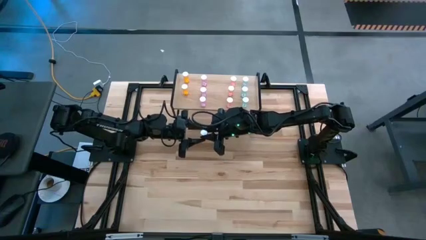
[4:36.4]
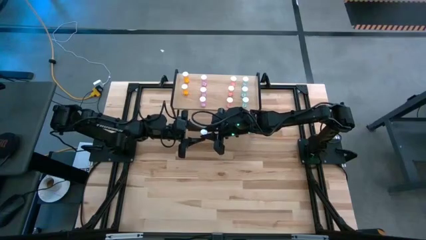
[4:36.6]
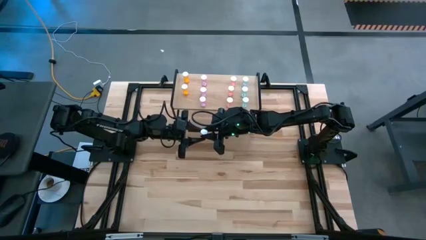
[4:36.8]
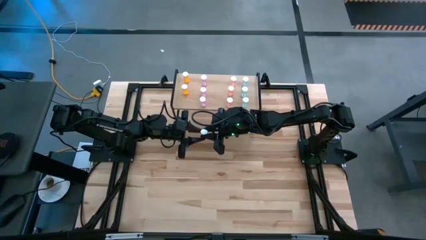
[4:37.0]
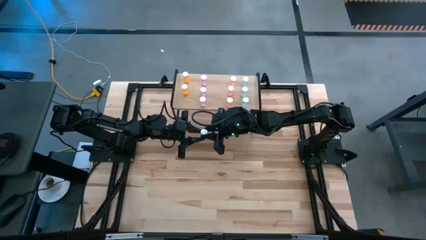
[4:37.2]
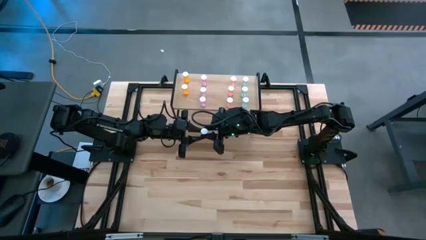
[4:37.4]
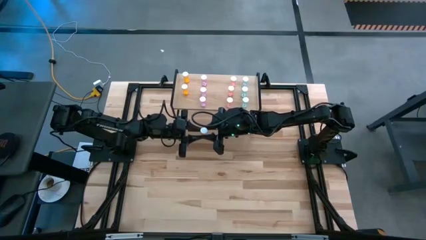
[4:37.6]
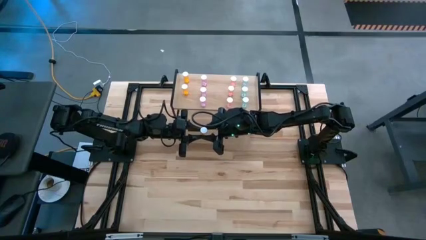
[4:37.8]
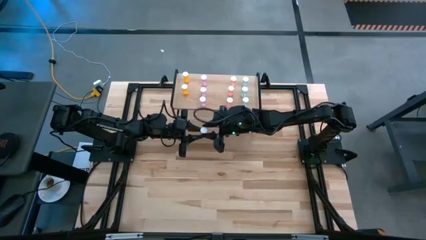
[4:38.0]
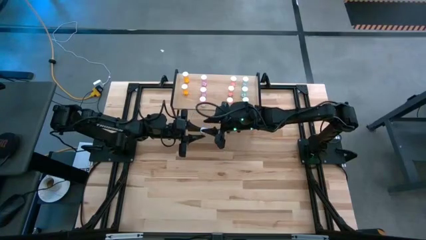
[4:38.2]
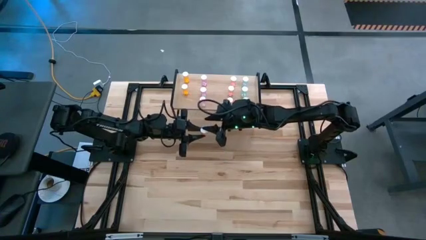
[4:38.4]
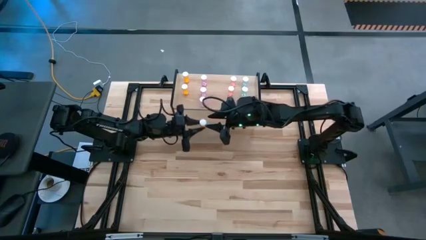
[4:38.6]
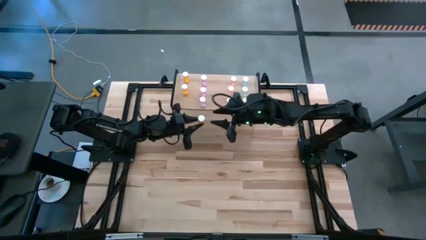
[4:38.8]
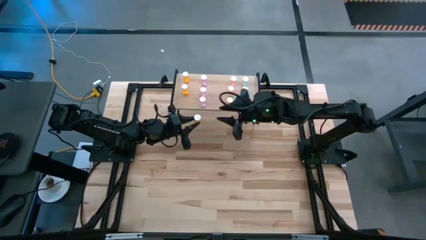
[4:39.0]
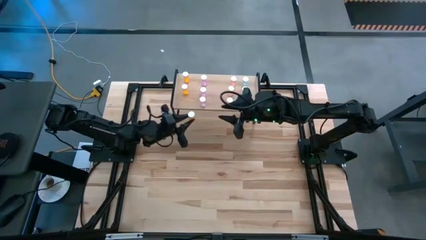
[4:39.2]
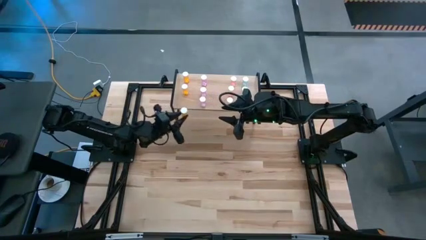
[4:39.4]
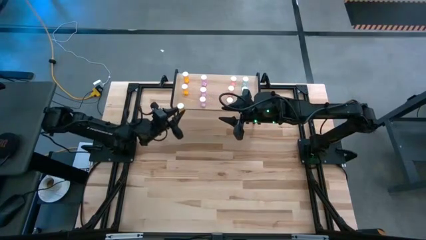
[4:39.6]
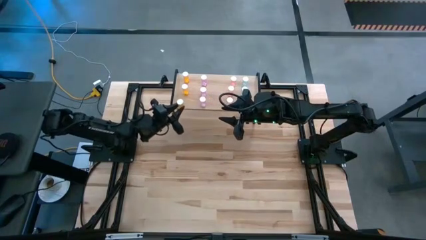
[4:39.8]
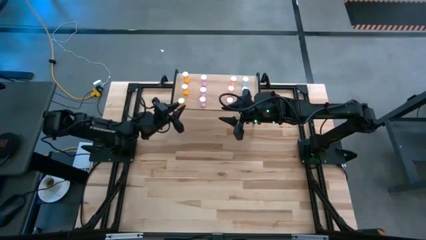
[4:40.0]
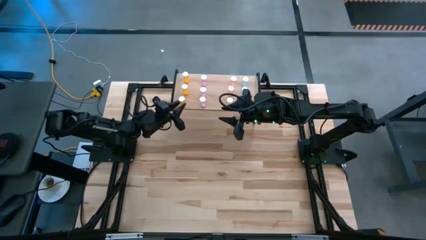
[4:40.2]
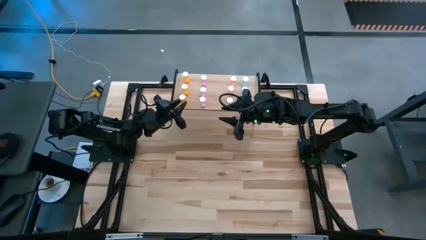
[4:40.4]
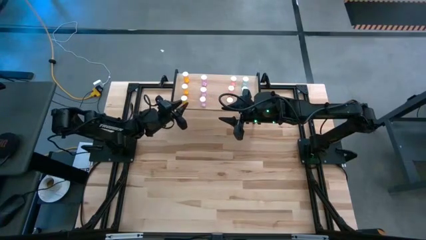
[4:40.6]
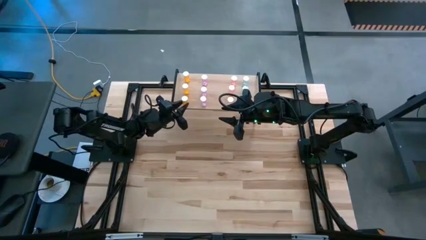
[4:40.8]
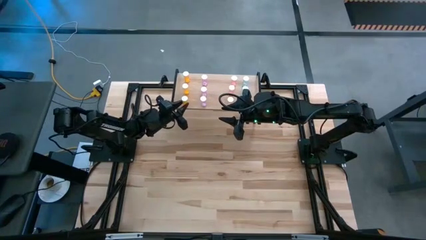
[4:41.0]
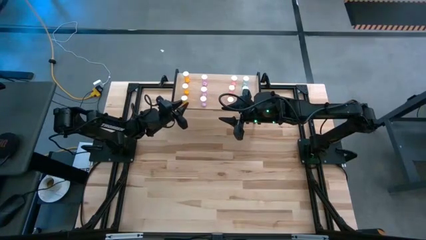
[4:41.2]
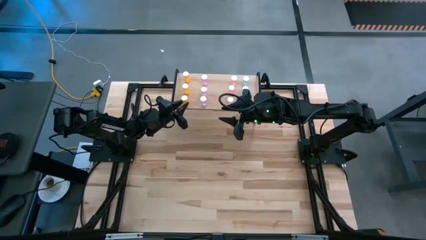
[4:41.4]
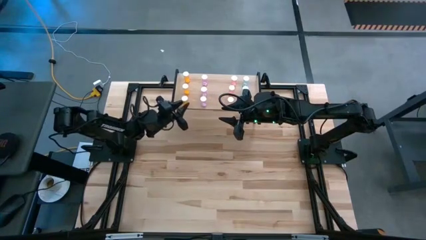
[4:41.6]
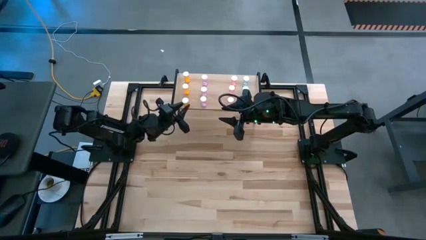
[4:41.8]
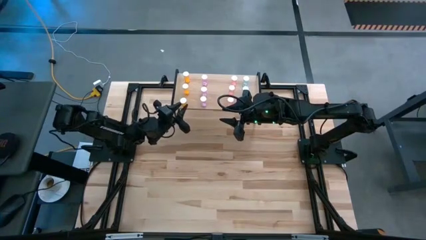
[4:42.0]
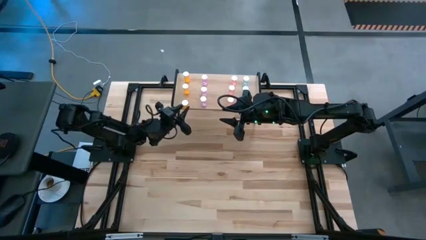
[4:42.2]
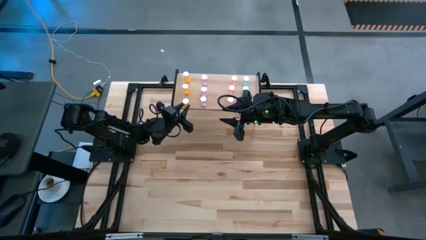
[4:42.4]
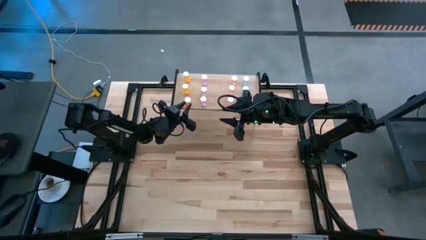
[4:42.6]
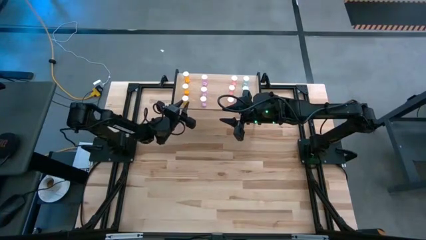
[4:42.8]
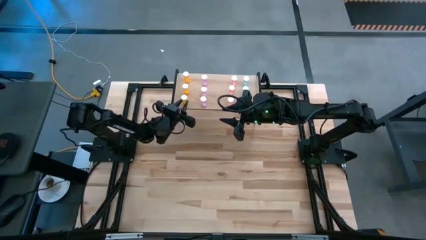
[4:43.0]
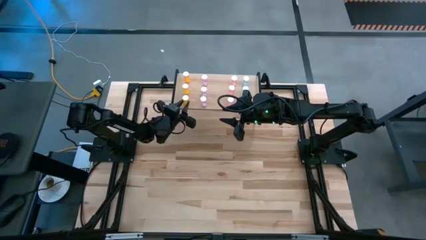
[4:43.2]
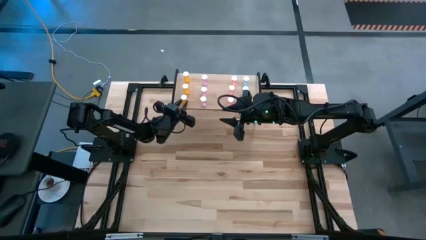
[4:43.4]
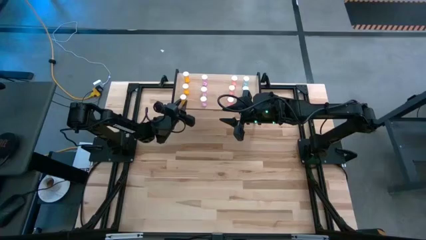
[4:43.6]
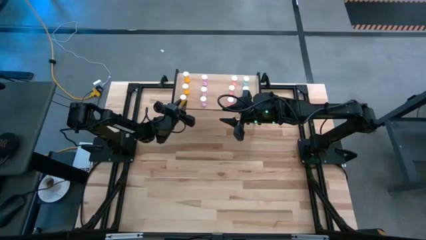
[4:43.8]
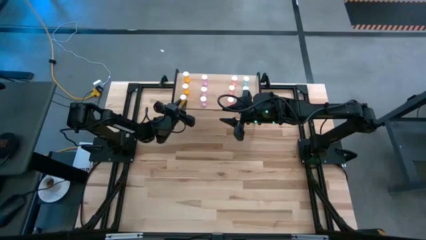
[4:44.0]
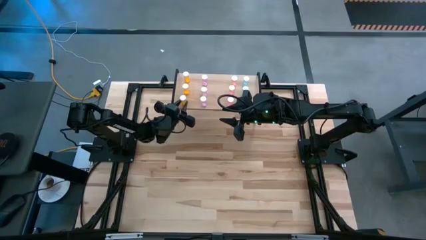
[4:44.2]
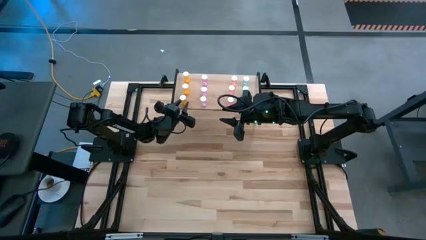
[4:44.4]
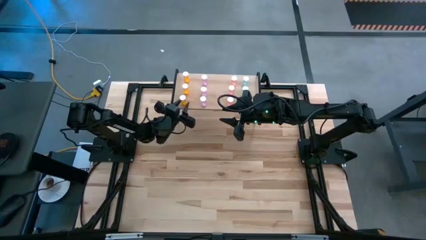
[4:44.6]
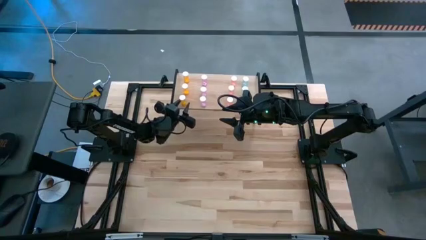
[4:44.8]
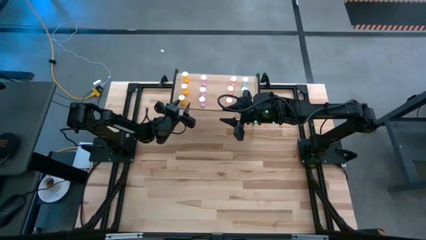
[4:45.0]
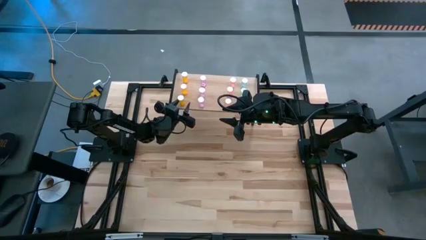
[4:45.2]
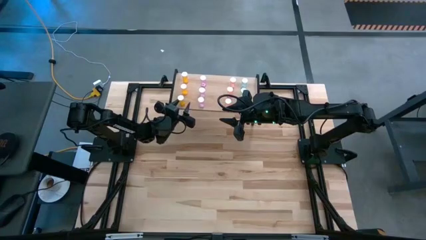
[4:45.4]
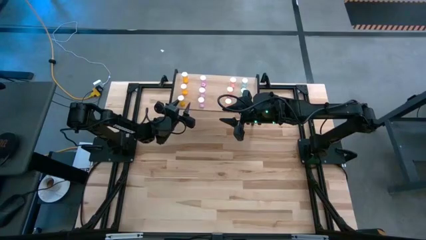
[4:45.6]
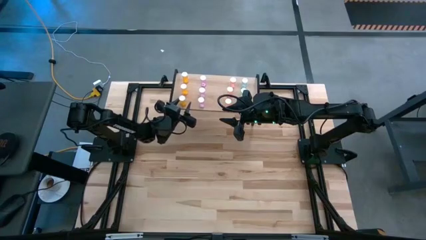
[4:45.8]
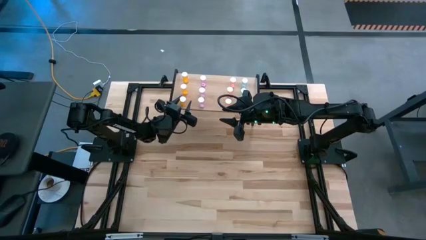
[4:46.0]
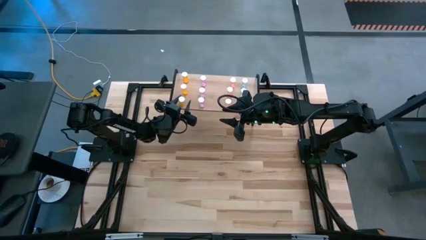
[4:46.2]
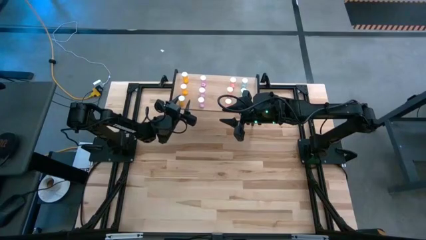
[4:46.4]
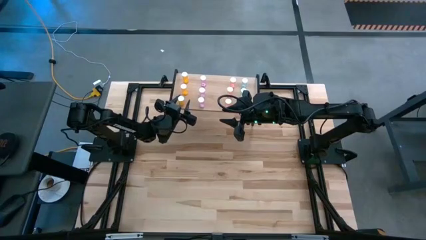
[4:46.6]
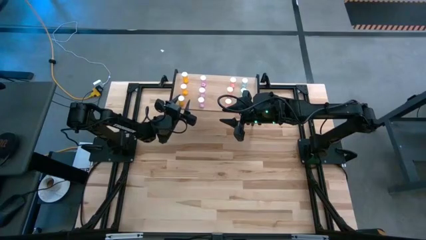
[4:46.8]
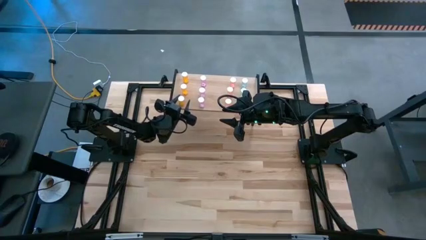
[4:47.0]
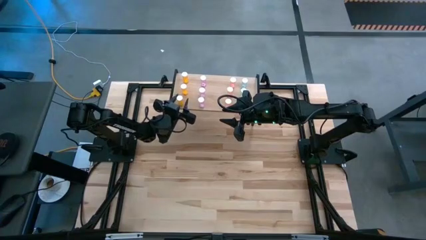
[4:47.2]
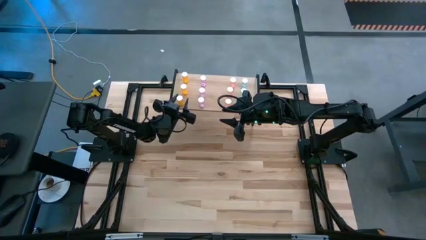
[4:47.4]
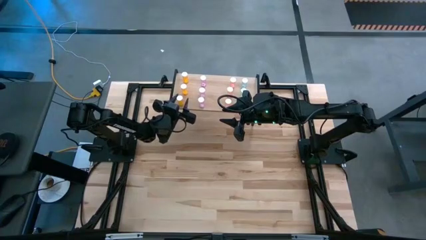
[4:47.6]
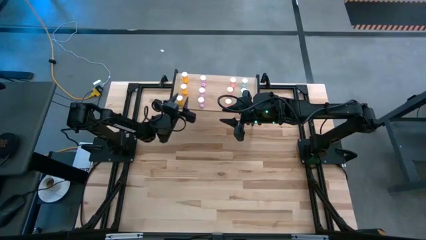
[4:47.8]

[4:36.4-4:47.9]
Task: Pick and place medicine bottles onto shelf by color
Put the orange pill bottle on the shelf aligned with the other orange pill bottles

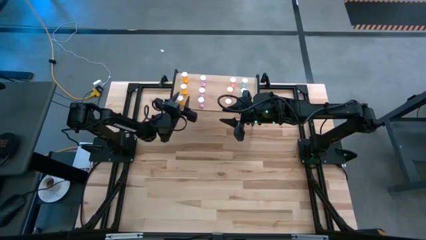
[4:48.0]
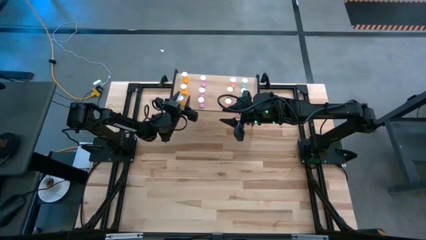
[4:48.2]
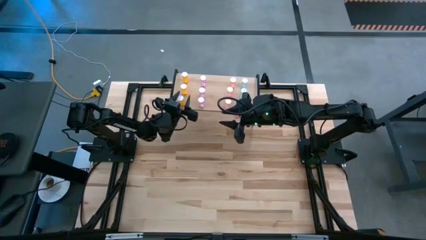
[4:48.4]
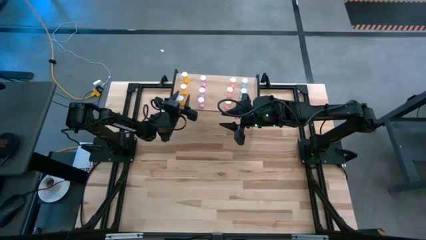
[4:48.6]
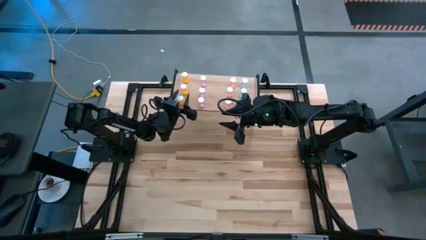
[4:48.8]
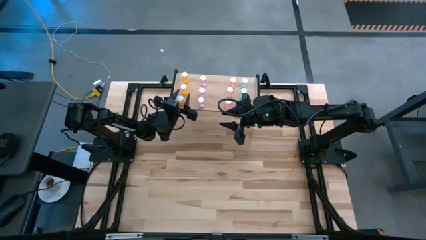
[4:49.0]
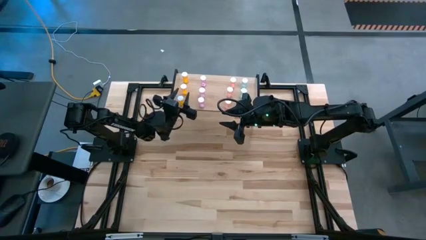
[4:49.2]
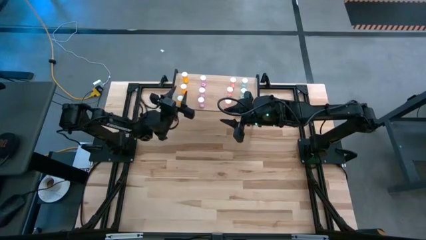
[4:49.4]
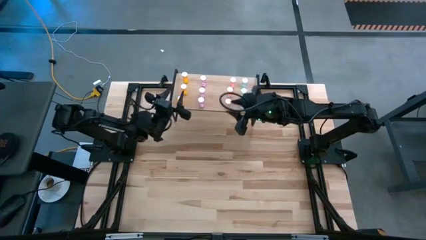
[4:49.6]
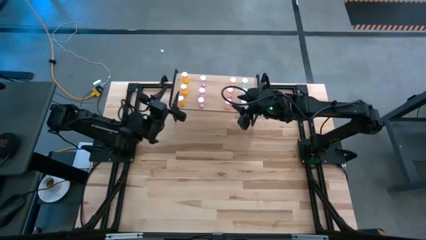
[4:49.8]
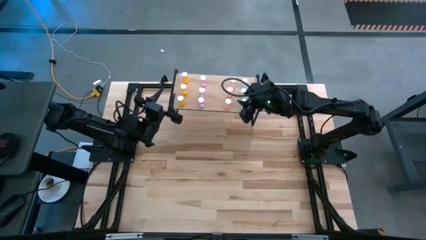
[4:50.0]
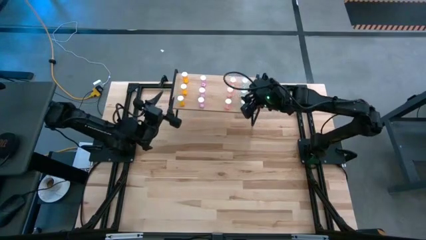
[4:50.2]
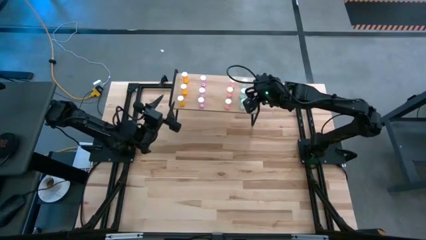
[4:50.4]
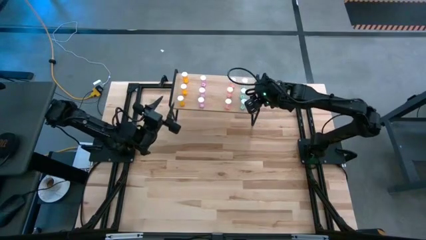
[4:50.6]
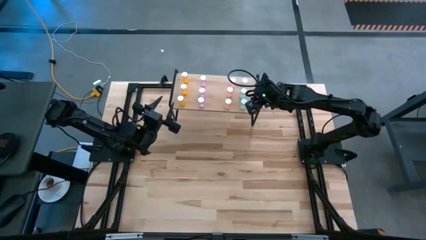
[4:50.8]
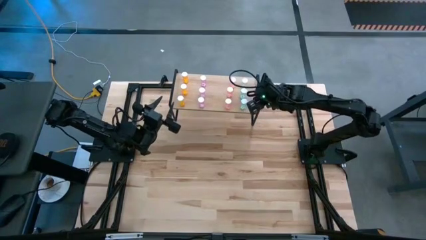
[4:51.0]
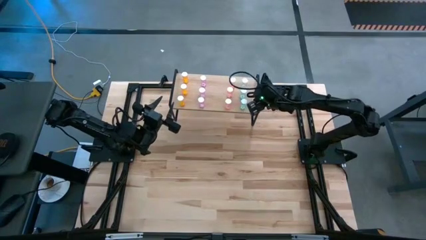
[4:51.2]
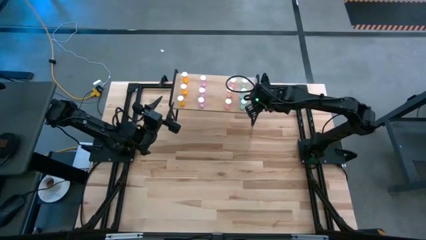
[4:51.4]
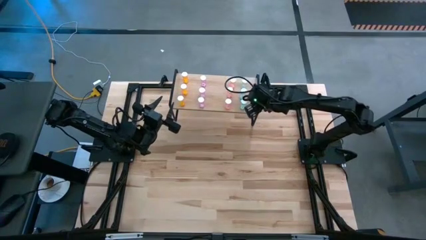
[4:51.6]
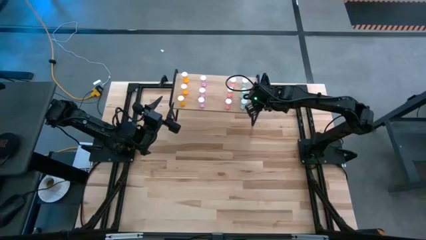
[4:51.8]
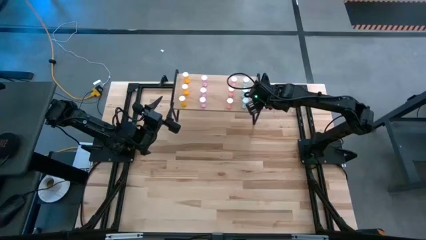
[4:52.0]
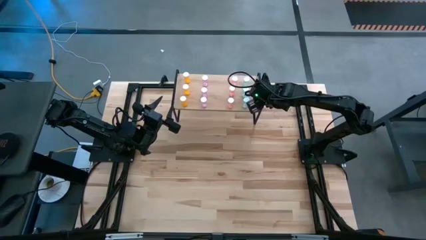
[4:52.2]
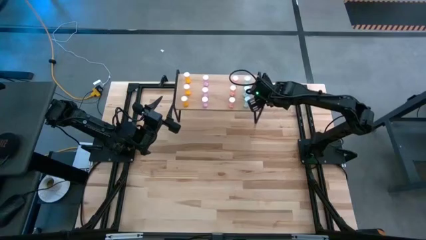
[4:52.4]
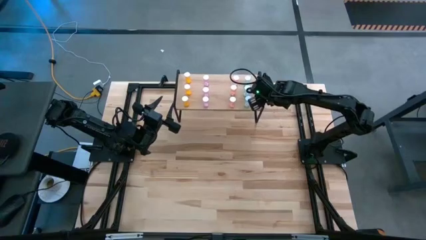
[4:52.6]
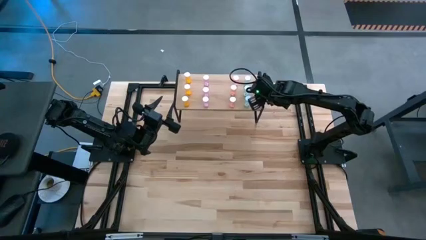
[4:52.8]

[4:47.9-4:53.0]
Adjust the shelf

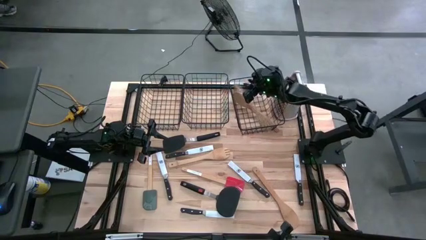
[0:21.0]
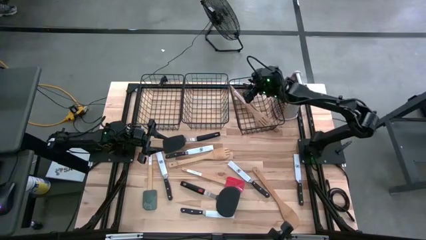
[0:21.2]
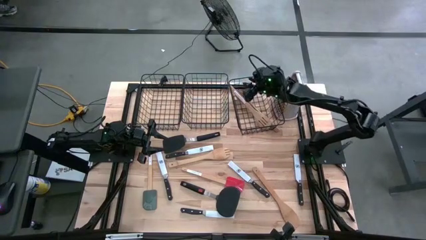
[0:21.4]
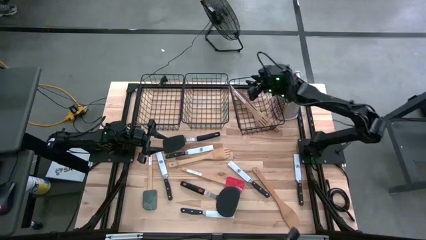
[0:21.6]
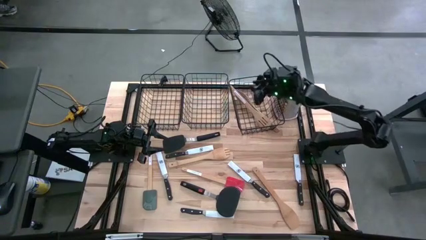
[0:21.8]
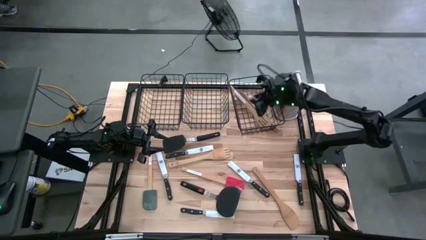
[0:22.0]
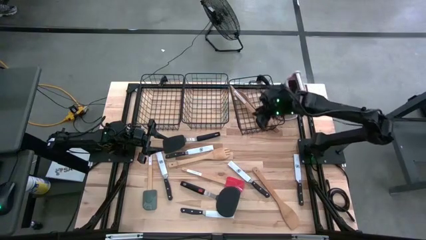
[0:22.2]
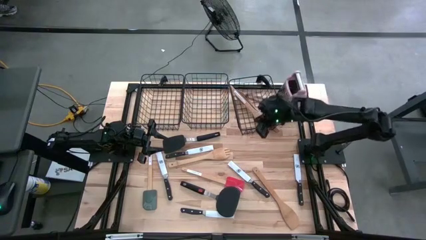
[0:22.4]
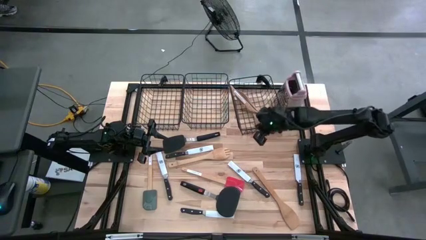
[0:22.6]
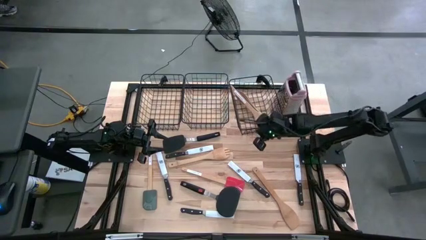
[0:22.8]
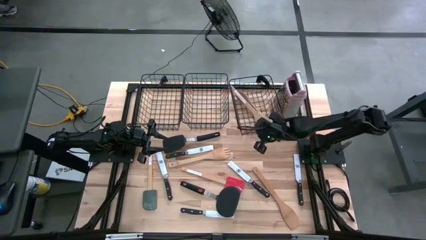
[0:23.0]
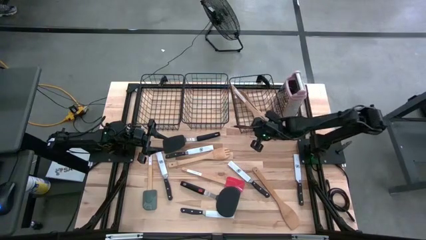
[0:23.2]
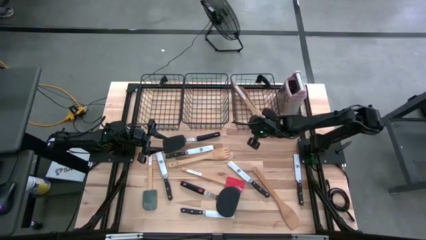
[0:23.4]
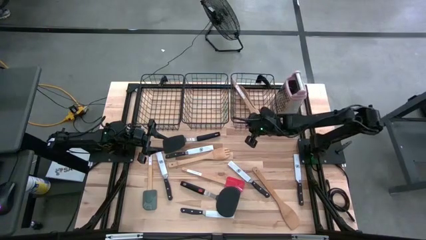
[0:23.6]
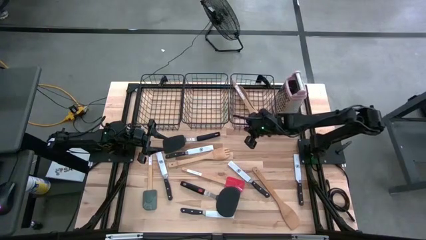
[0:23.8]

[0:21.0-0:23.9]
Task: Pick & Place Kitchen Items
Adjust the right black wire basket on the table
